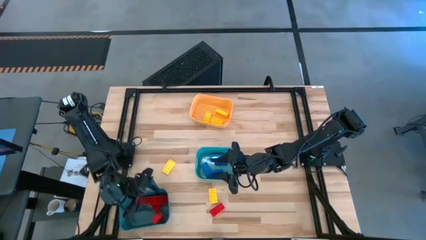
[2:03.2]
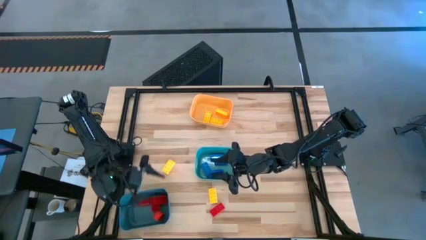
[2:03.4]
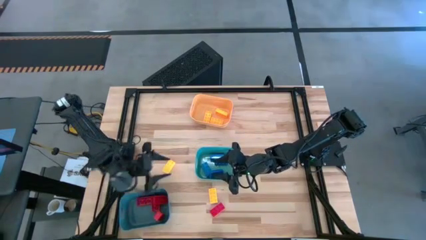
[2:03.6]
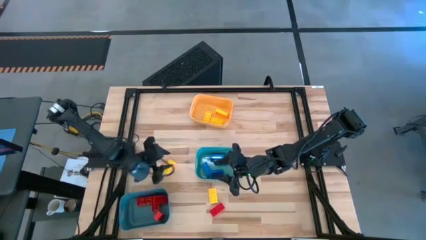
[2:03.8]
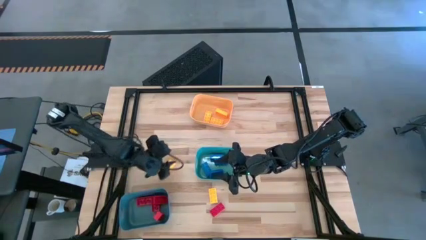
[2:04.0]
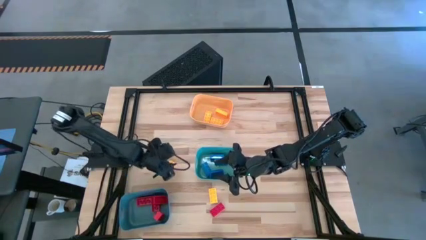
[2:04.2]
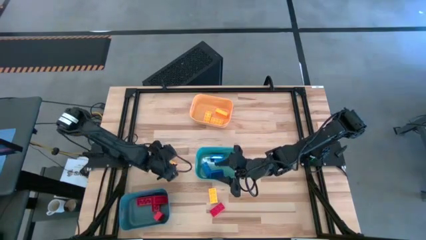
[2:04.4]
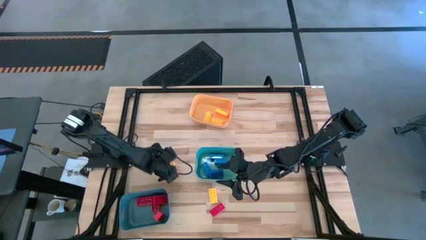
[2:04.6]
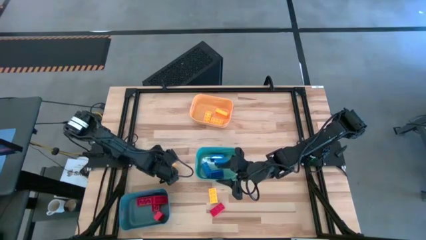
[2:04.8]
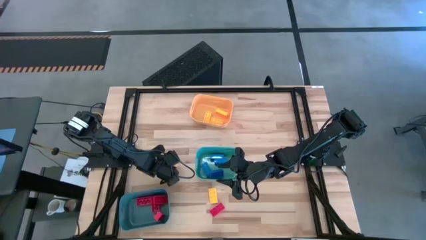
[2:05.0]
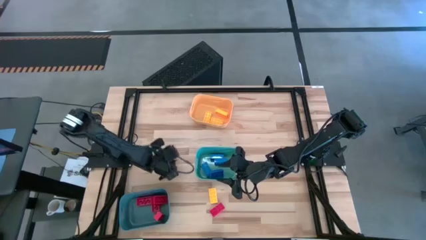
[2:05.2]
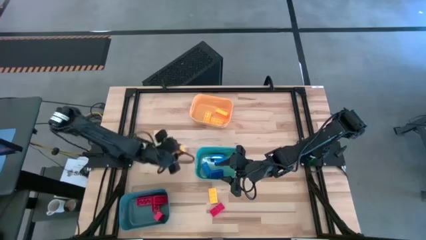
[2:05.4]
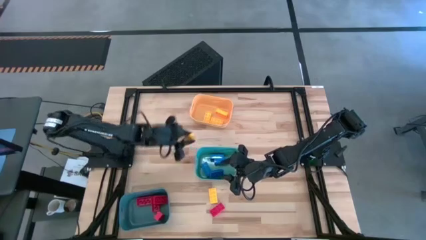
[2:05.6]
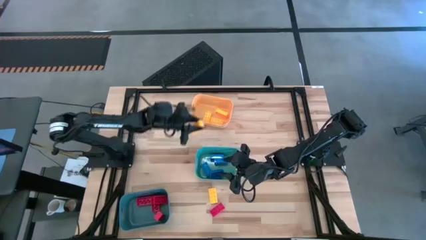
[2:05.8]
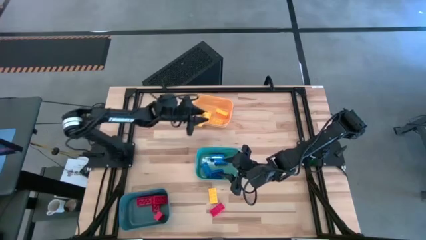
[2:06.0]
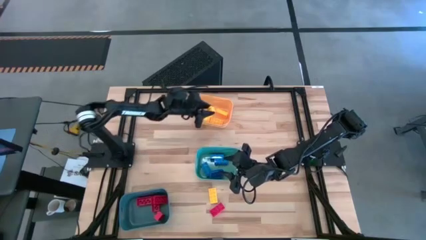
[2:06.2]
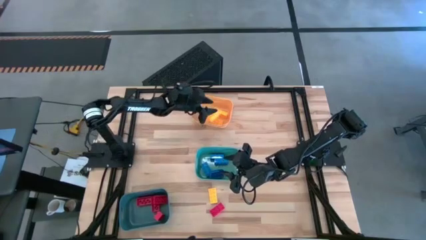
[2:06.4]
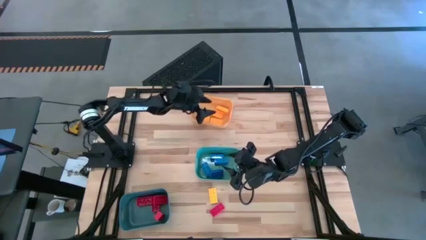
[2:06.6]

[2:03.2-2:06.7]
Task: Sort & place blocks by color
Put the yellow game piece into the yellow bin

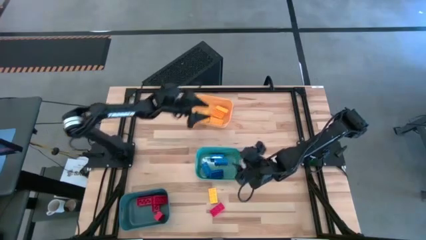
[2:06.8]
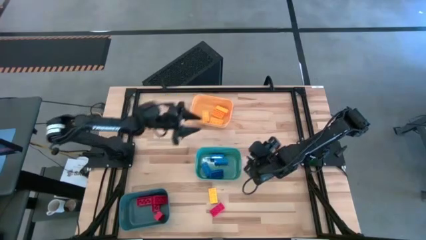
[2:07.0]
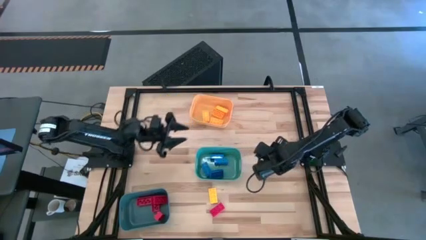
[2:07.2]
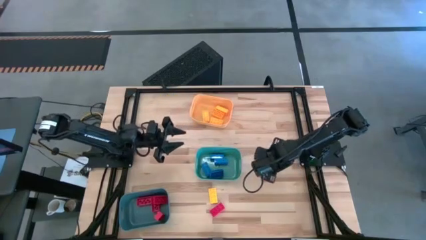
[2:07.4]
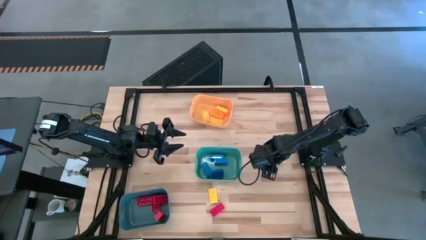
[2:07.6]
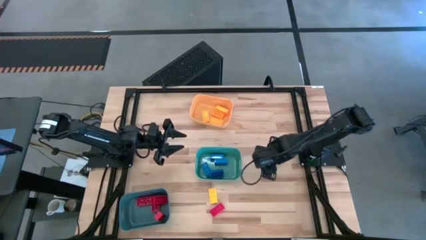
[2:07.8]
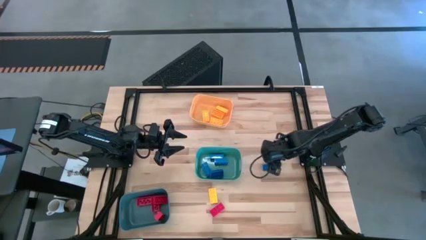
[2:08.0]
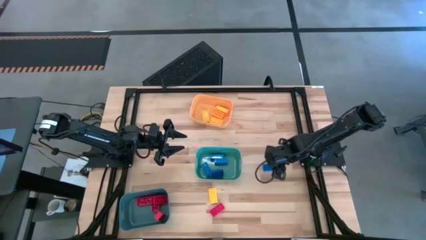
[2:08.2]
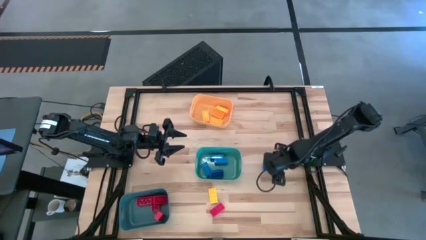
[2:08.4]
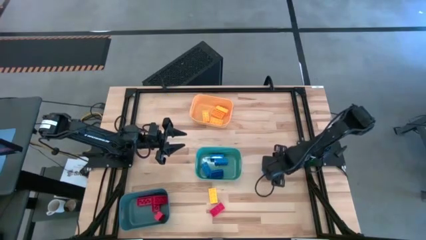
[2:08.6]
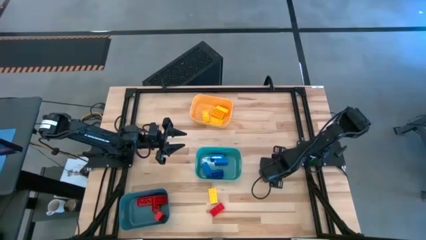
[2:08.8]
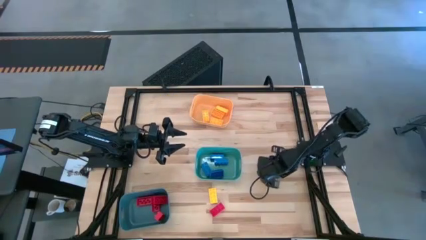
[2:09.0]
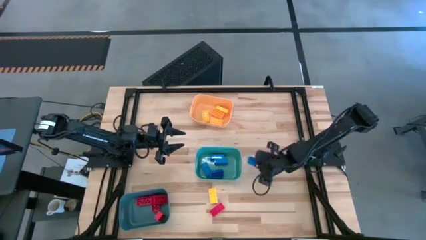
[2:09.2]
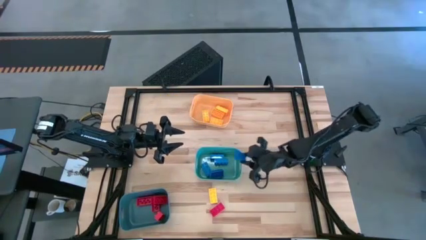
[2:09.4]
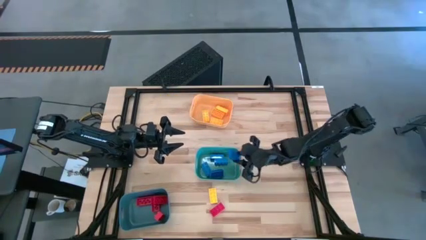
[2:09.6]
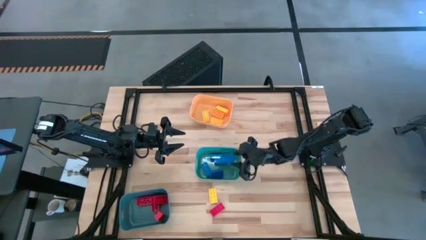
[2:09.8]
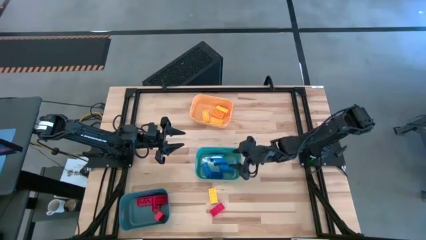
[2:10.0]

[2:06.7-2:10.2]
Put the blue game piece into the green bin

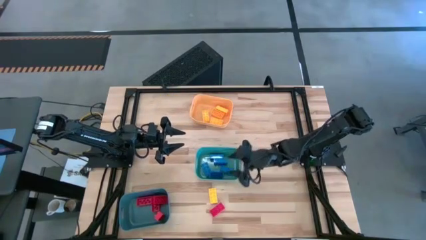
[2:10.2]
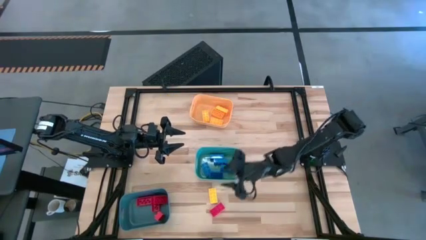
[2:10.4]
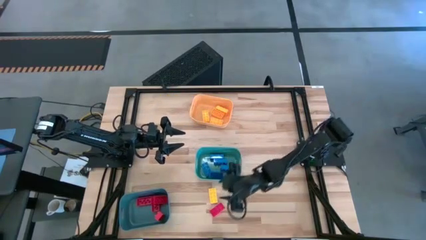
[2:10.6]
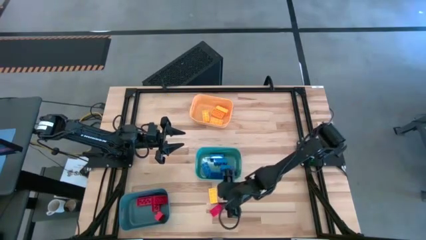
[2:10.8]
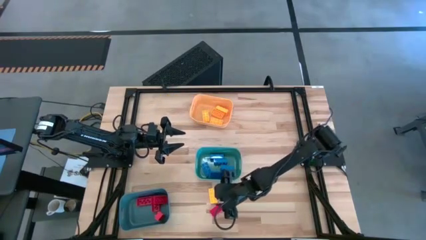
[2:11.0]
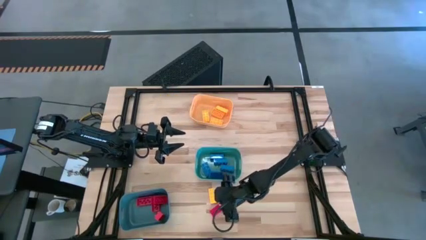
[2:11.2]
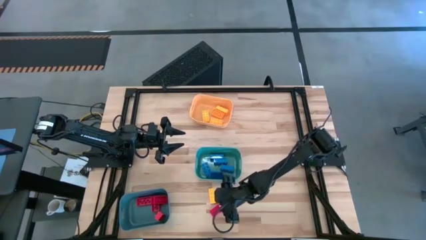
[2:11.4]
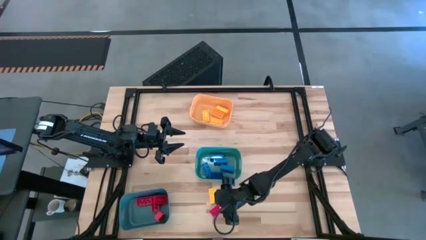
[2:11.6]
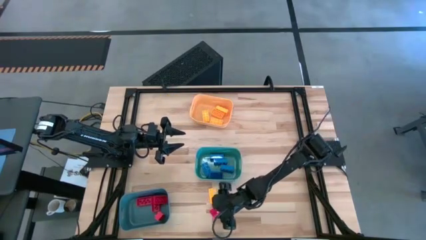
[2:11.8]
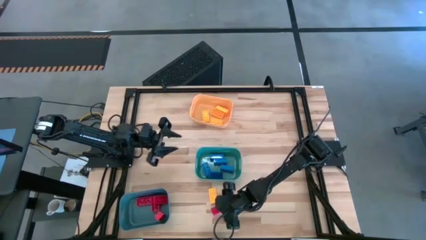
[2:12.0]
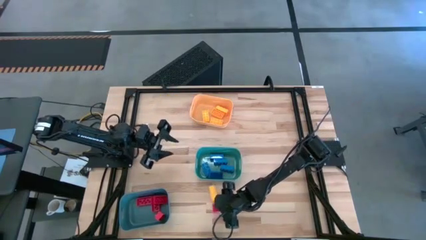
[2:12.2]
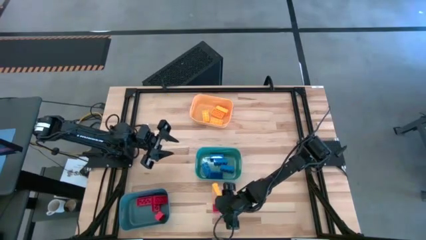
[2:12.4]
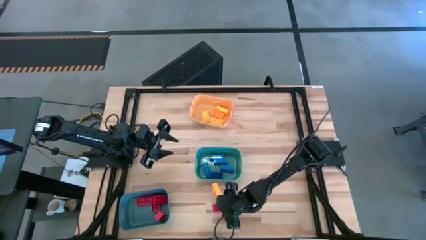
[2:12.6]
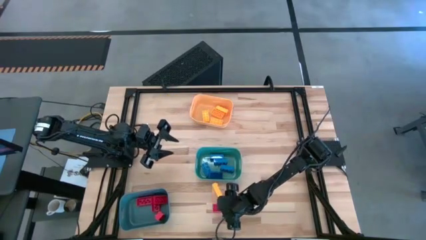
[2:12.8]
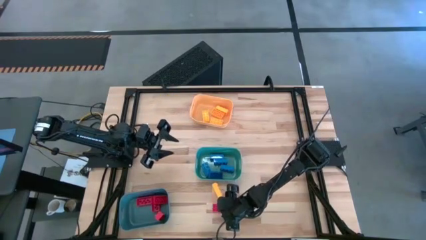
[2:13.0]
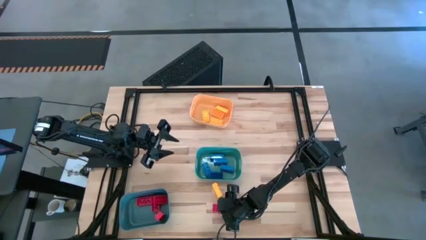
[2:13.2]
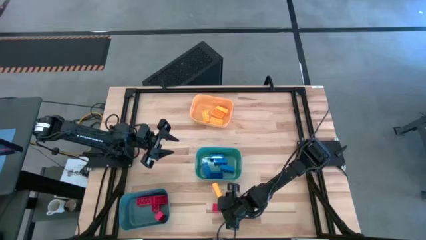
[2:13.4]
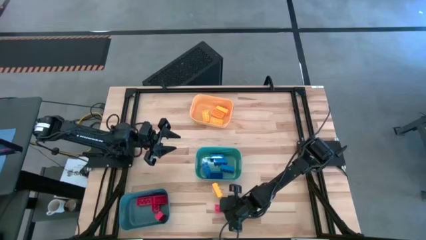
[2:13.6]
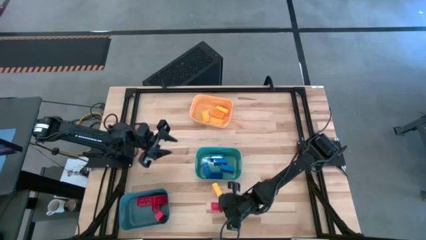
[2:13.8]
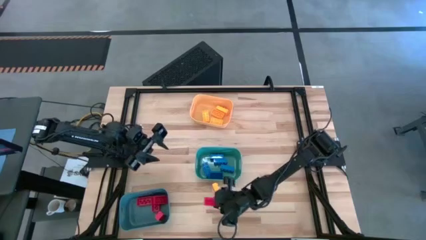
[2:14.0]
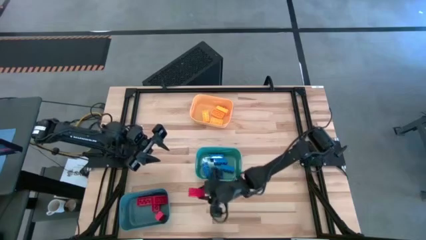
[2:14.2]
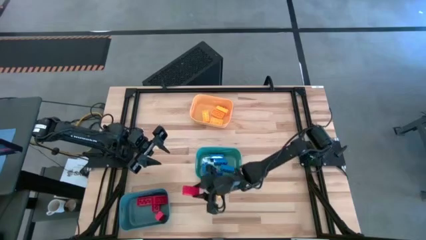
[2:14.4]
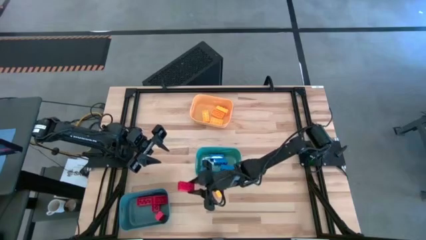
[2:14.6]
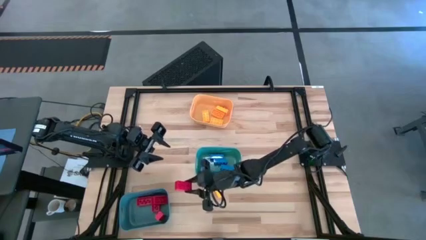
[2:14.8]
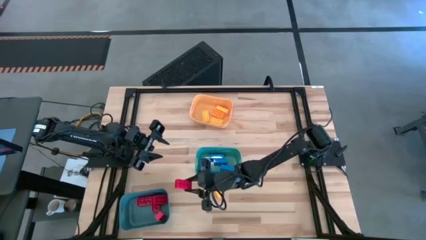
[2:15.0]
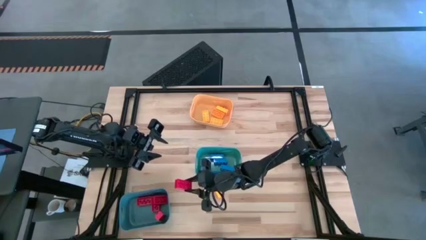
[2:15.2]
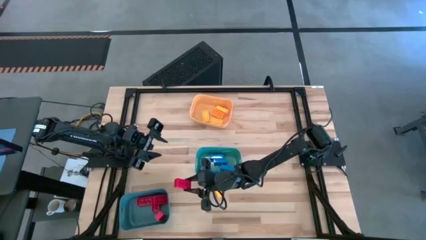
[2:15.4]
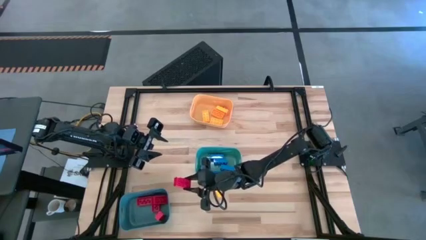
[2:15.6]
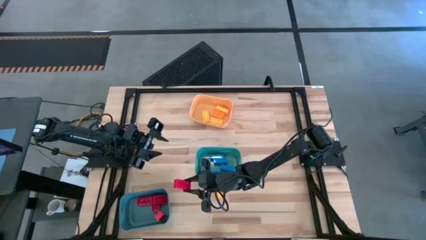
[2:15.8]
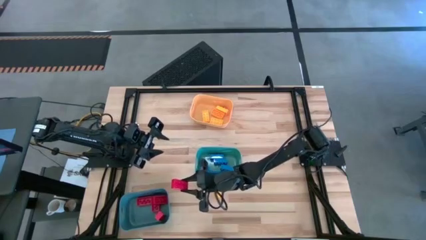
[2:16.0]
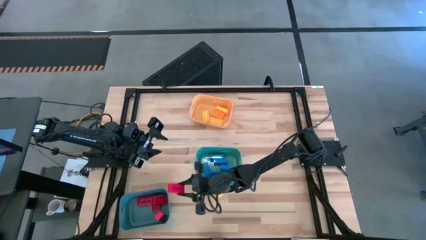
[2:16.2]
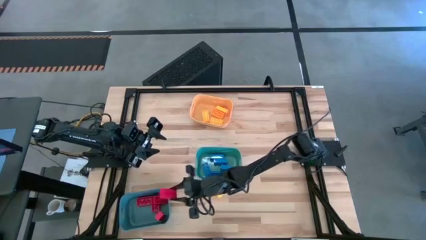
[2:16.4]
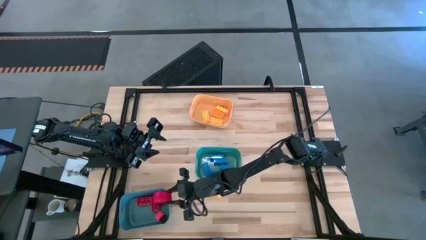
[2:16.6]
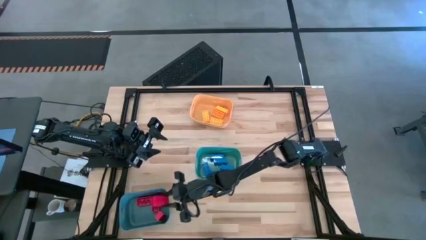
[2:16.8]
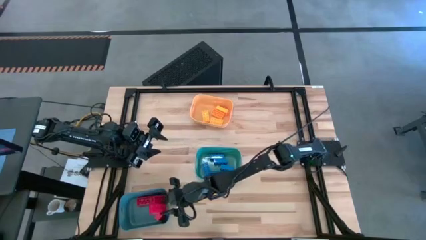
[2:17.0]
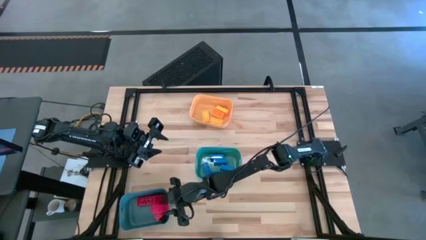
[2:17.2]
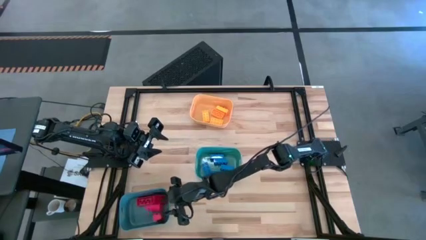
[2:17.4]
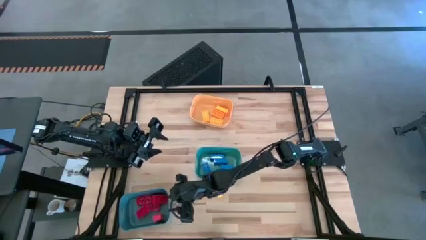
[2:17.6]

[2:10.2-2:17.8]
Put the red game piece into the blue bin
